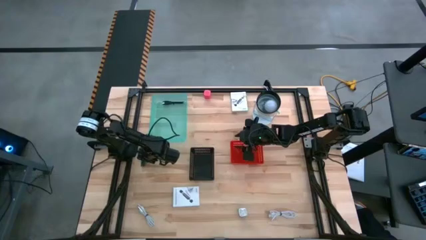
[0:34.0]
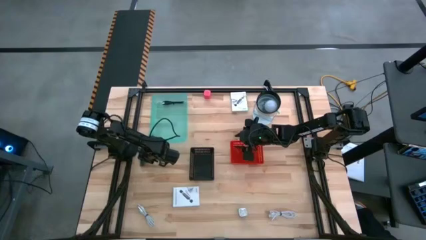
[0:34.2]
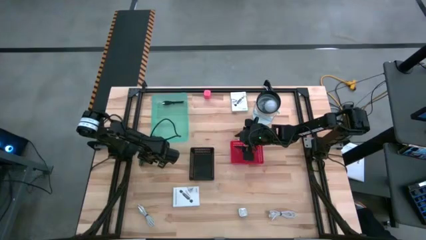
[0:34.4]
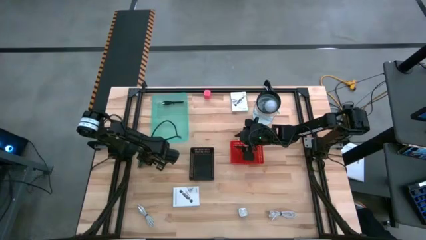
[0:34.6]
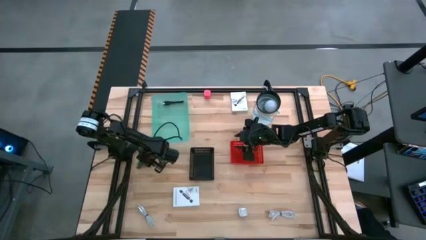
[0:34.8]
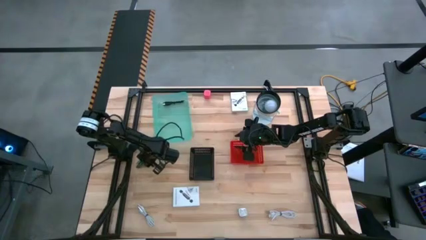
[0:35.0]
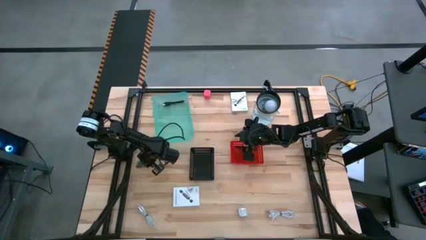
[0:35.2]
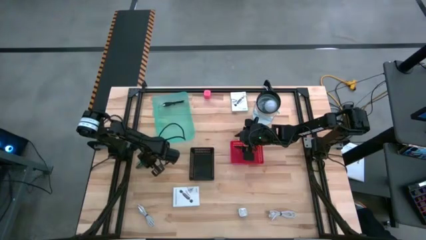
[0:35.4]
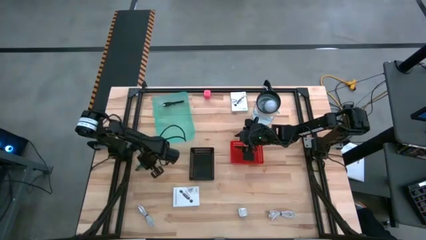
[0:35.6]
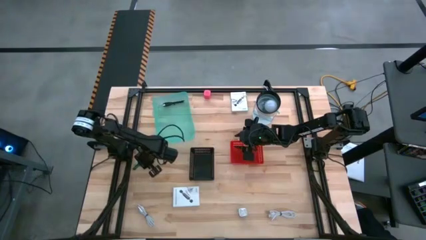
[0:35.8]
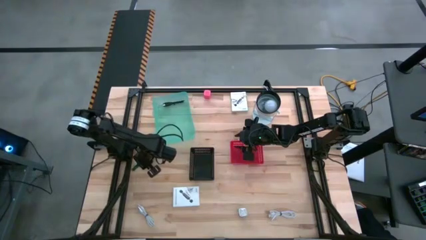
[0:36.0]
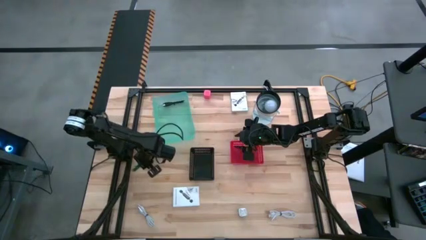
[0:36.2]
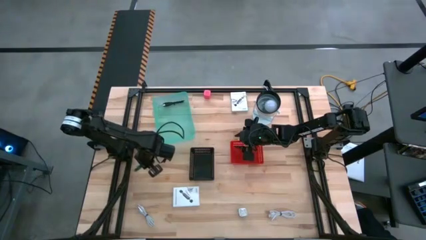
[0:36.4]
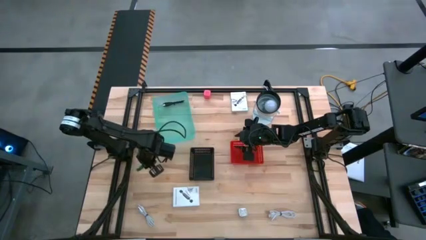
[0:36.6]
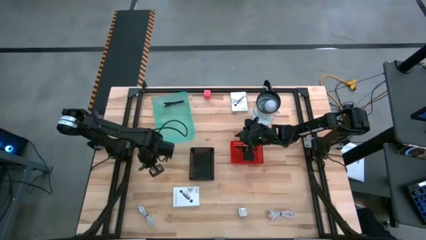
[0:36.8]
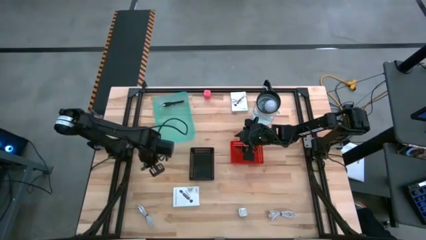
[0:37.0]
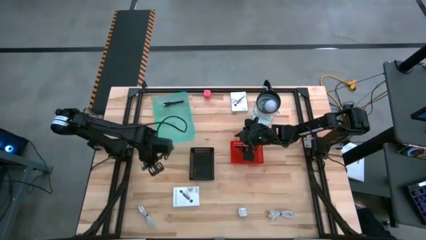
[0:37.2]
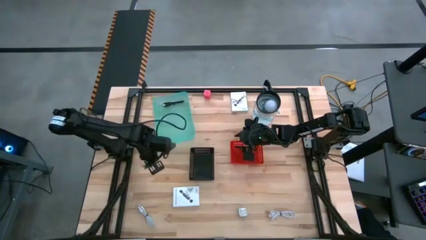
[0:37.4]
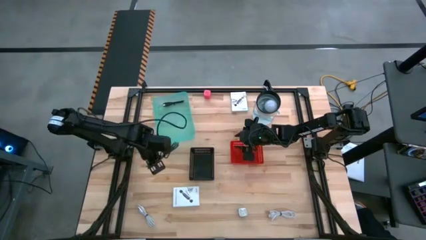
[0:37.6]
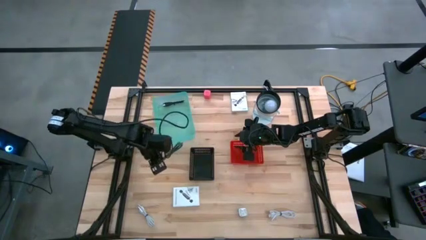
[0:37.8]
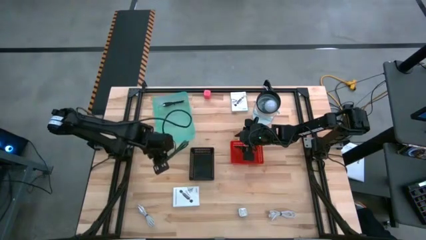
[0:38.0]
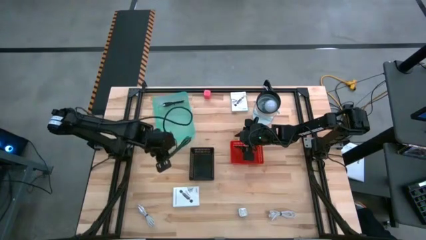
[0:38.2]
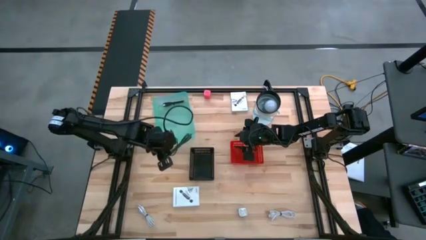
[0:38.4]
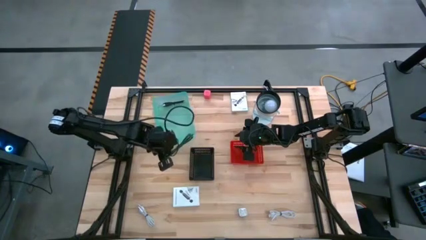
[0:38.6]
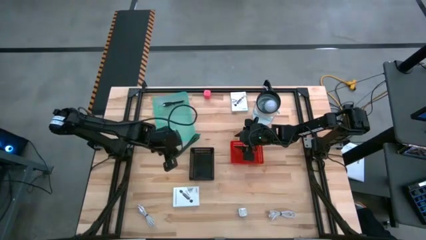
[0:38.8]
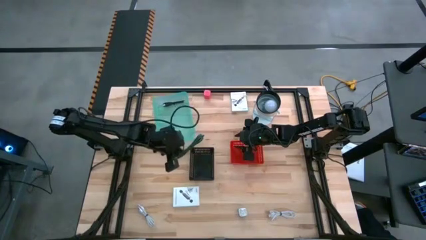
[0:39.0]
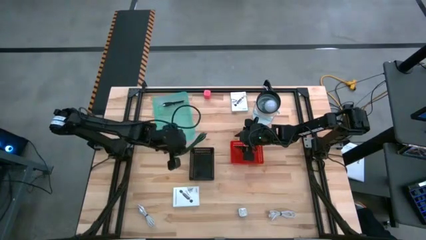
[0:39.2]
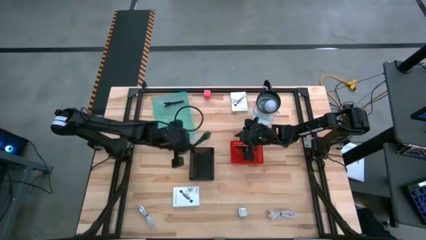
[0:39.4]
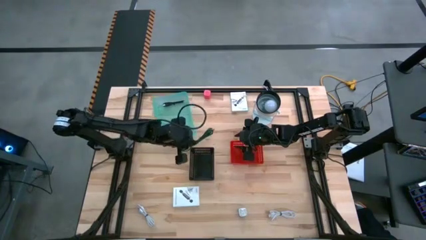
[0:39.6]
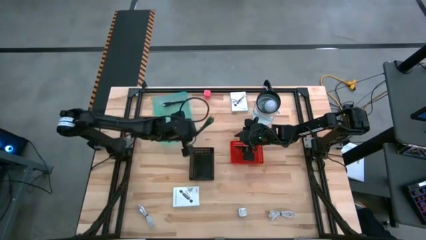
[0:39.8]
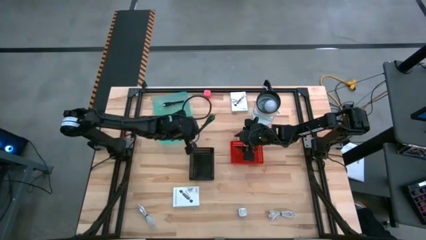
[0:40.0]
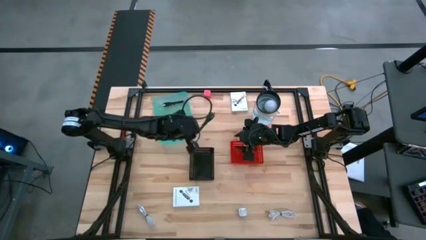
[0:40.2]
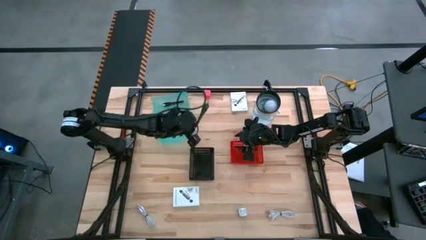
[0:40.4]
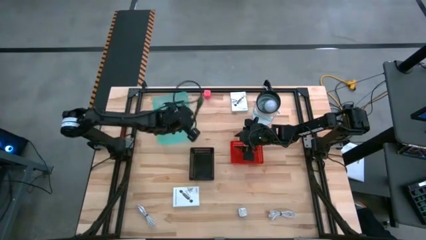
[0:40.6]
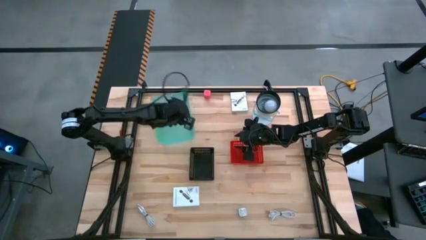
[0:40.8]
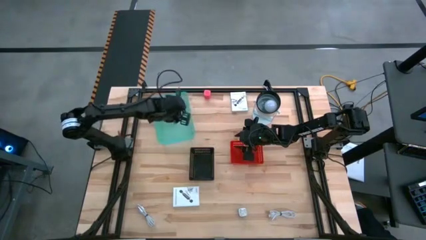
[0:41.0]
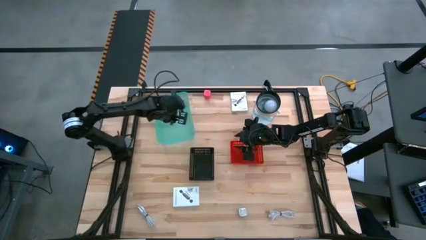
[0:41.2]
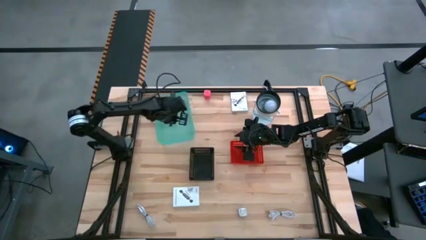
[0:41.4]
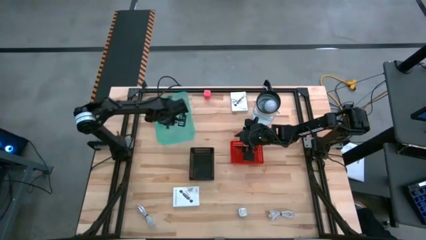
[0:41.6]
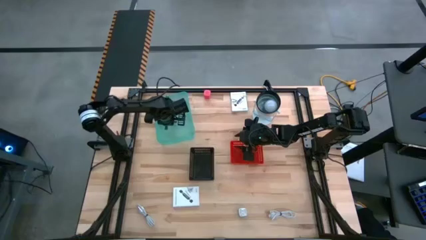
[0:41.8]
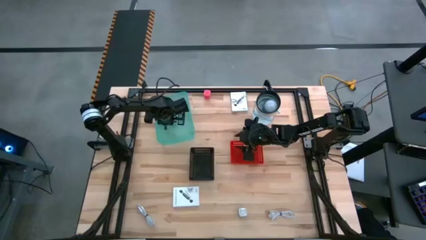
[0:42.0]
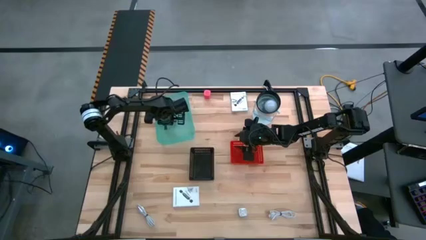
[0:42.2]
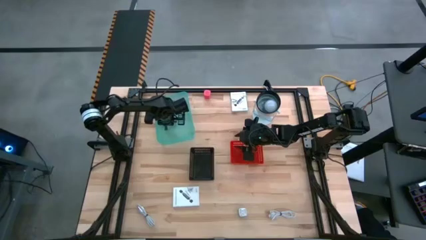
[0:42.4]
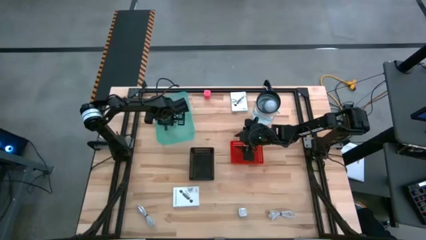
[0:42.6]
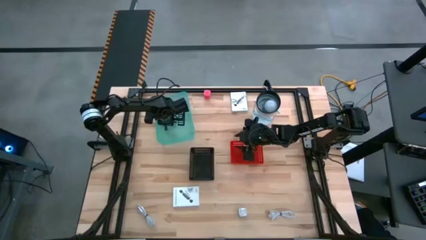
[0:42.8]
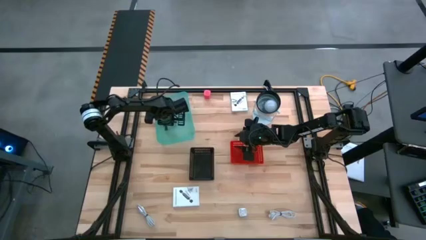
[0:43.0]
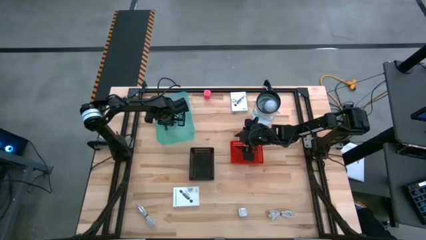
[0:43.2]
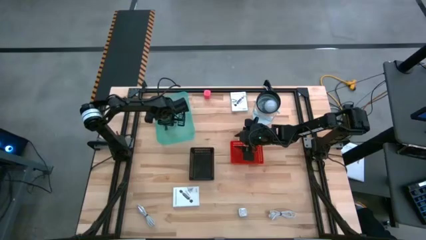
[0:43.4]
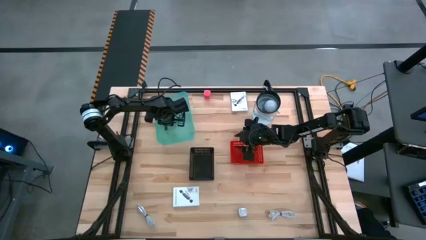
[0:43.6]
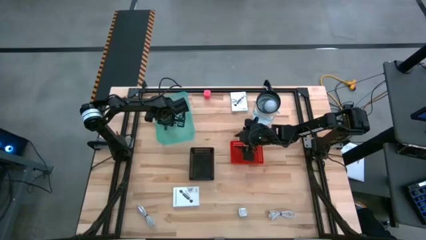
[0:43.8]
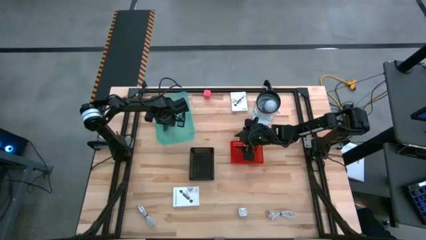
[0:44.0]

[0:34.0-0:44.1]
Task: Pick and place items into bin
Put the green charger cable into the blue bin

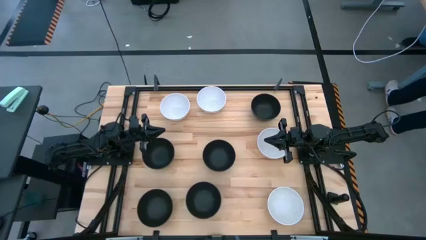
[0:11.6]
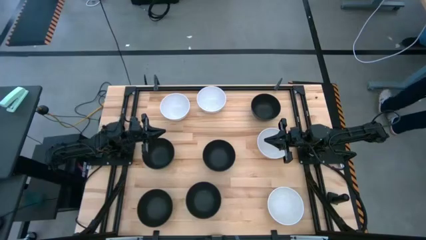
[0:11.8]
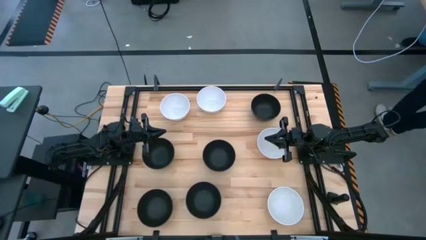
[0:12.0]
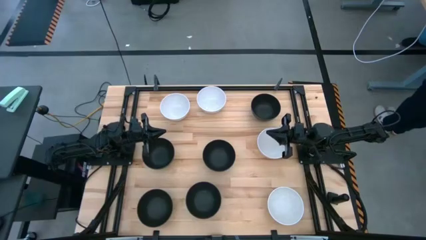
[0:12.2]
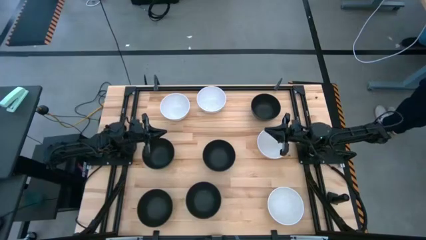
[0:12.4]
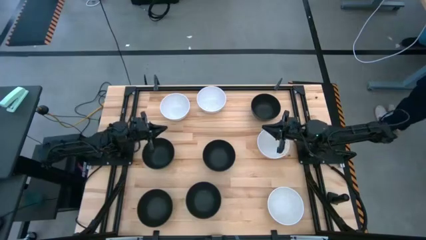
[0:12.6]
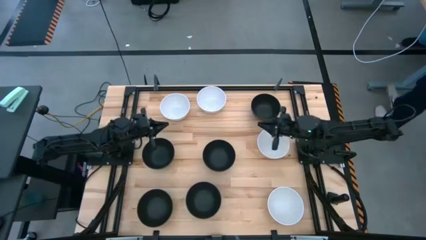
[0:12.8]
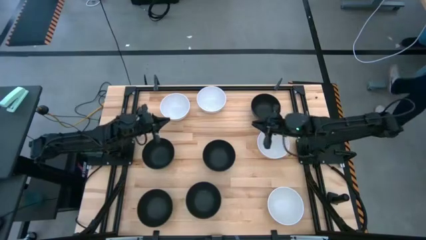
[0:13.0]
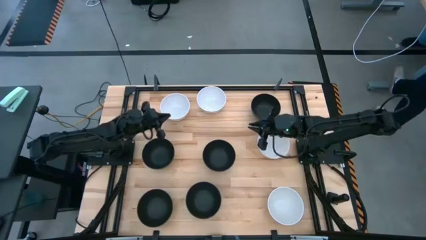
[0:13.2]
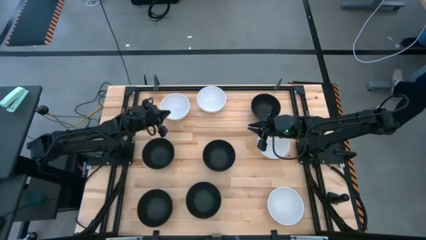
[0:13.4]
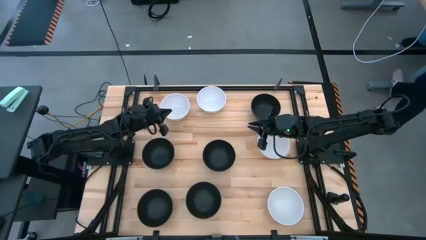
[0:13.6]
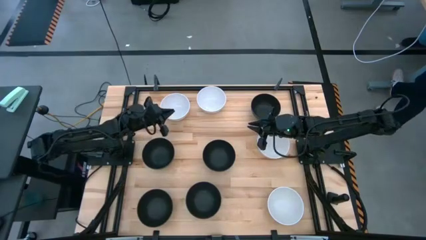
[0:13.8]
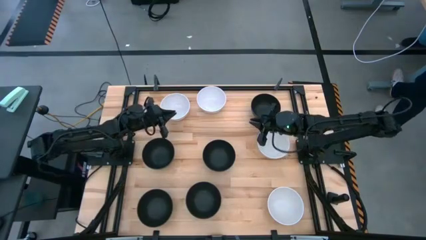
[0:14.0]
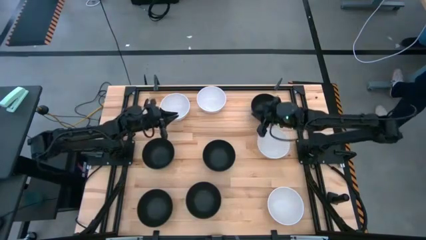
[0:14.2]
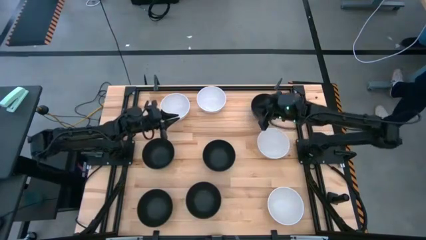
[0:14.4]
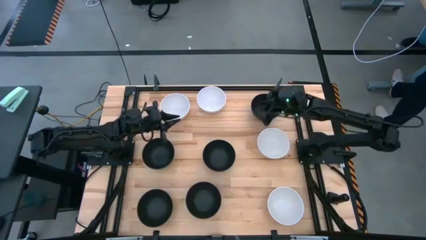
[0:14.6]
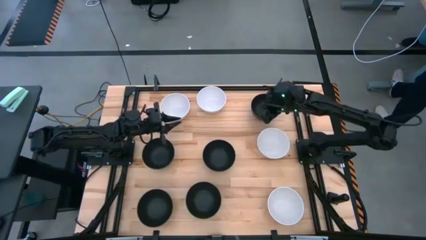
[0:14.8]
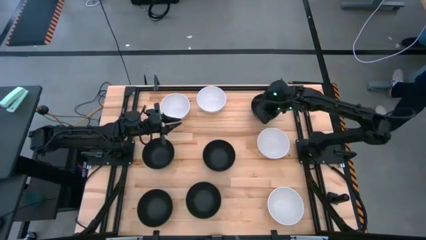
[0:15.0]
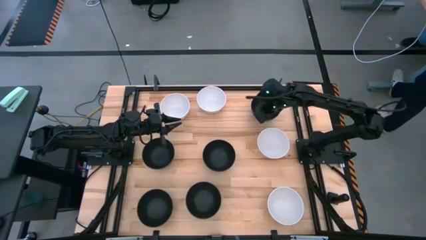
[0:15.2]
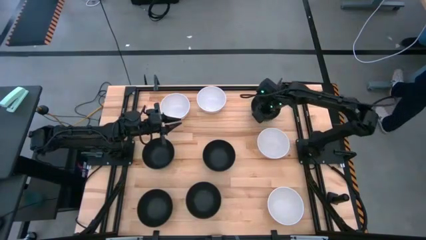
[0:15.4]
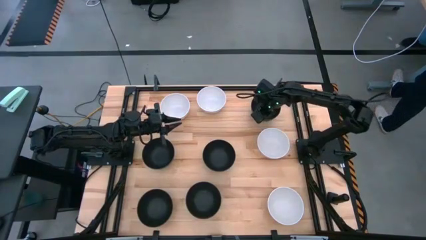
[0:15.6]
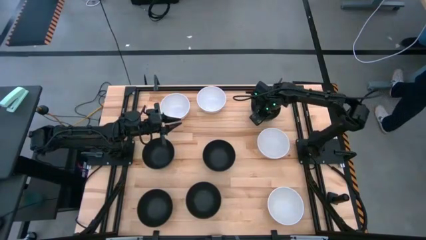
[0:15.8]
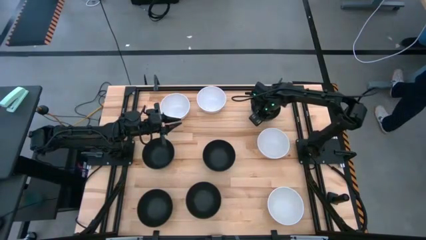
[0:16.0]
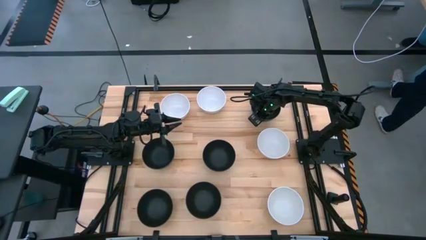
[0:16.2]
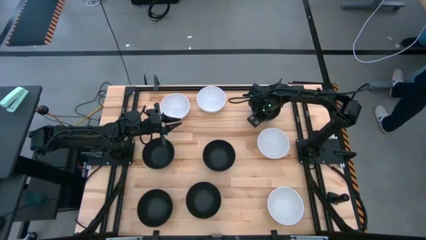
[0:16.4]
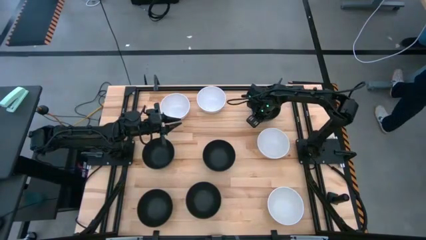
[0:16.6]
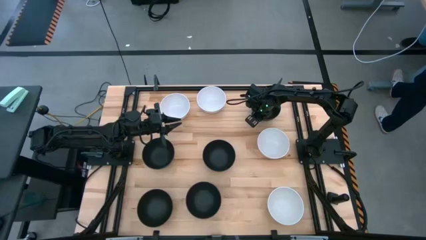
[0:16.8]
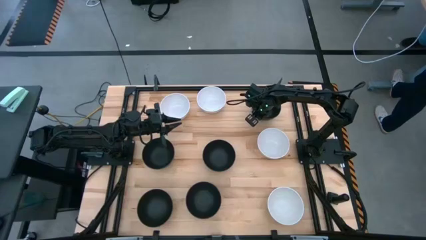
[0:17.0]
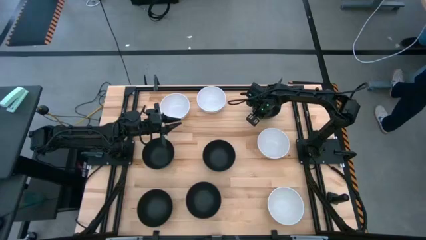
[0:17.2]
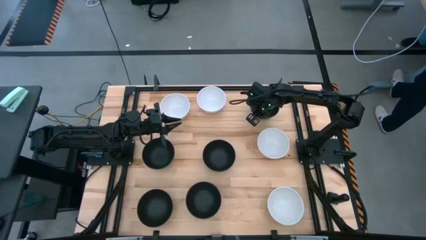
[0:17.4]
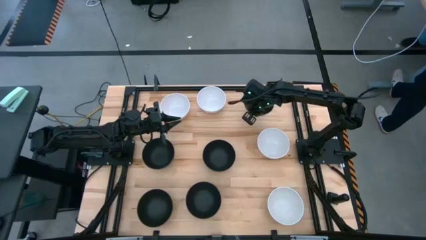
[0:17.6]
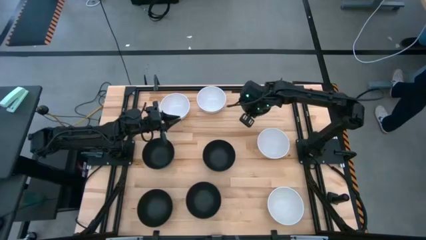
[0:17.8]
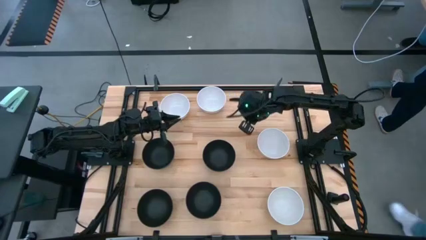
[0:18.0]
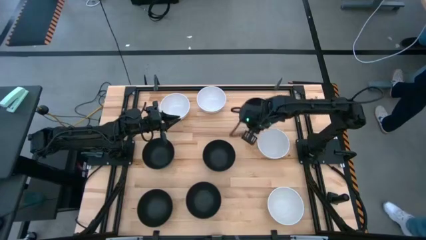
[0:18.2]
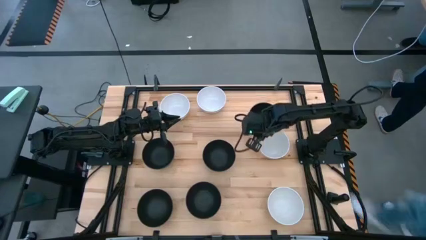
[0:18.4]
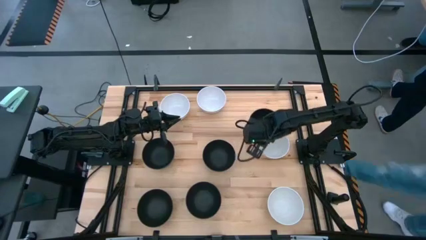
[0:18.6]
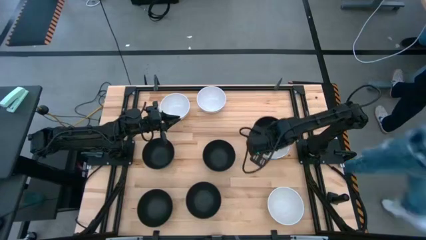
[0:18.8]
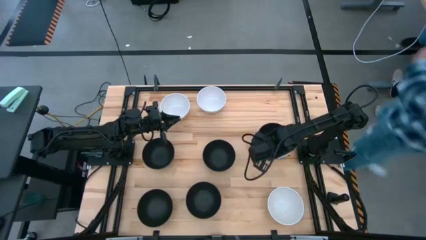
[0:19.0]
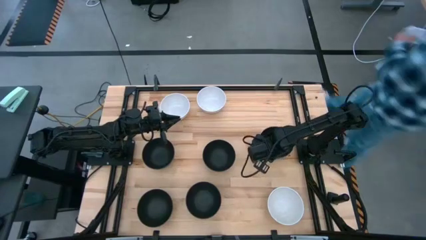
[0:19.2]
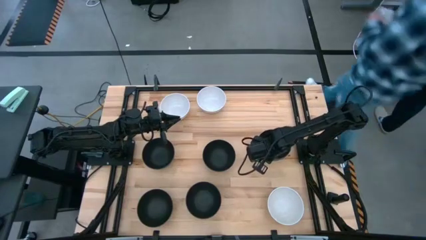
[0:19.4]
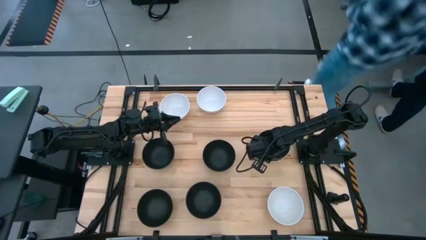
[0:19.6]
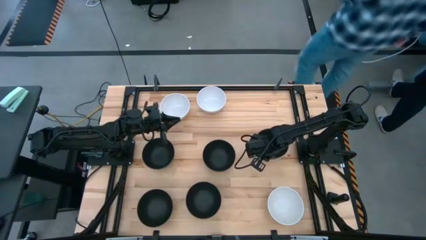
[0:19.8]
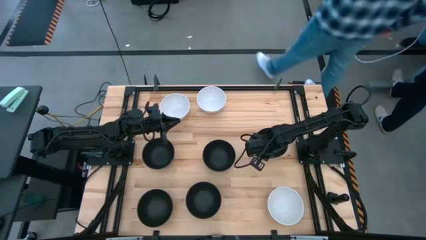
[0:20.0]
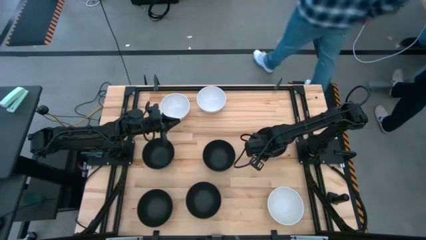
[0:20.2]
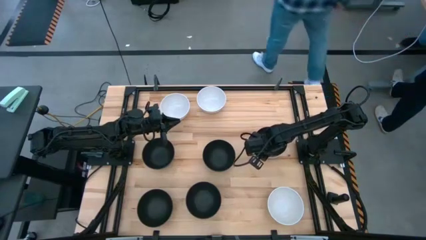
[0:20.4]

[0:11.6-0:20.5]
Task: Nest bowls inside each other
Stack the black bowl on top of the white bowl
